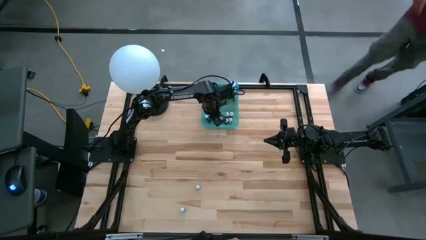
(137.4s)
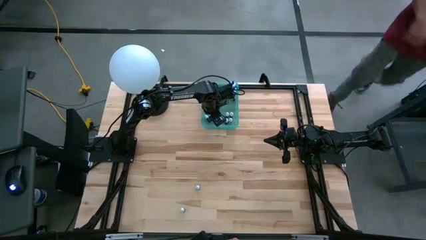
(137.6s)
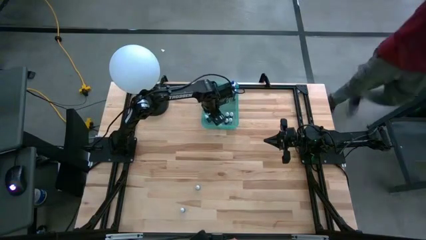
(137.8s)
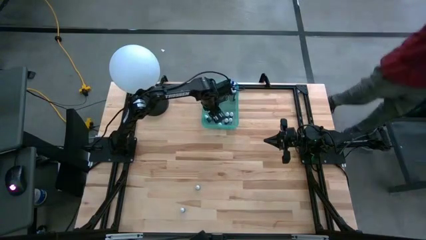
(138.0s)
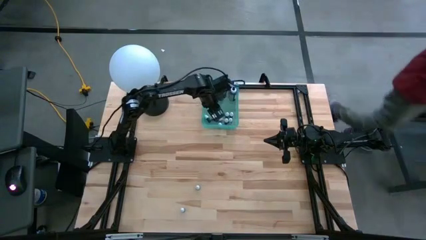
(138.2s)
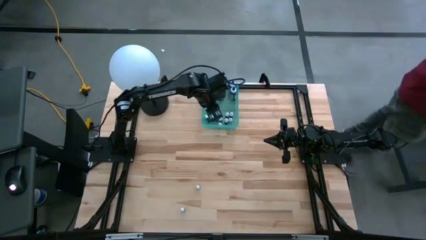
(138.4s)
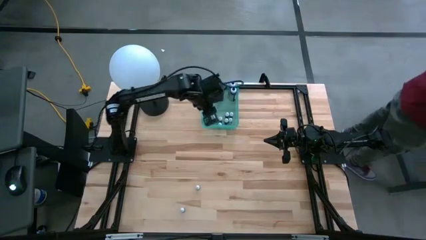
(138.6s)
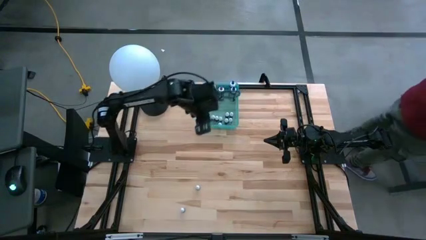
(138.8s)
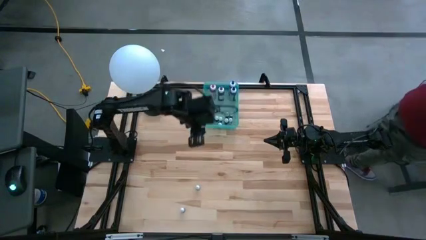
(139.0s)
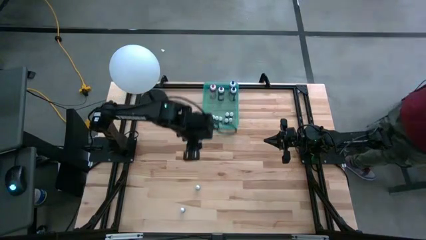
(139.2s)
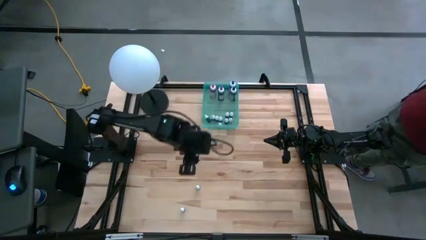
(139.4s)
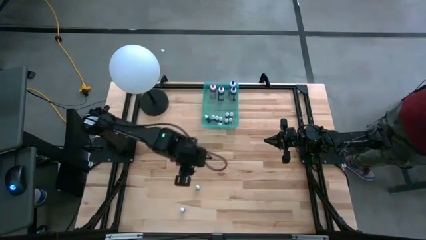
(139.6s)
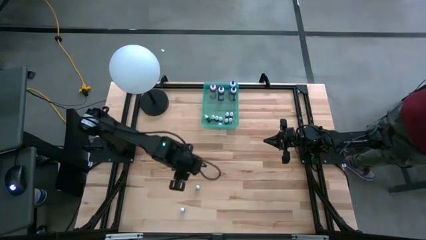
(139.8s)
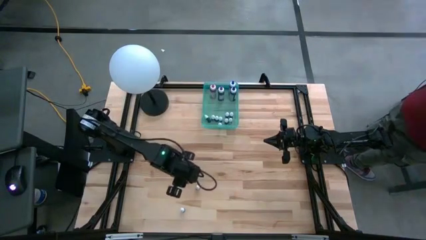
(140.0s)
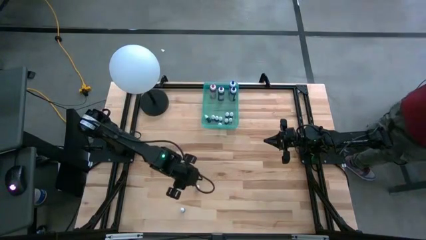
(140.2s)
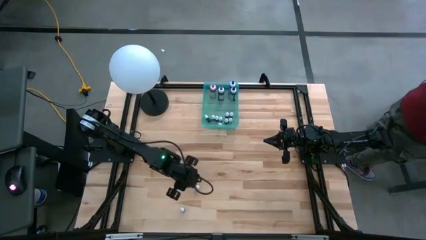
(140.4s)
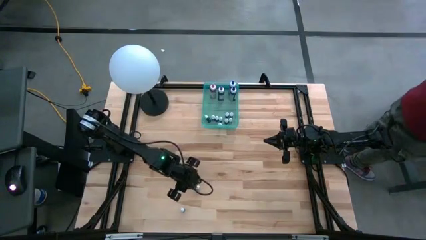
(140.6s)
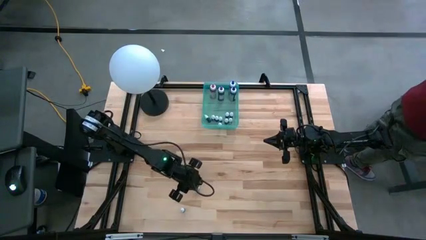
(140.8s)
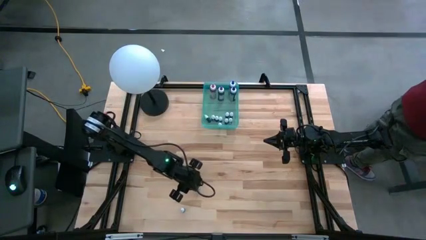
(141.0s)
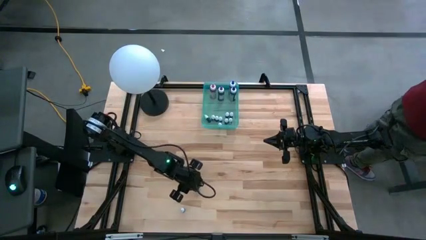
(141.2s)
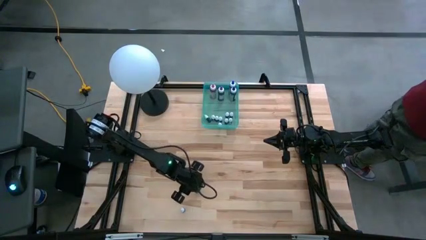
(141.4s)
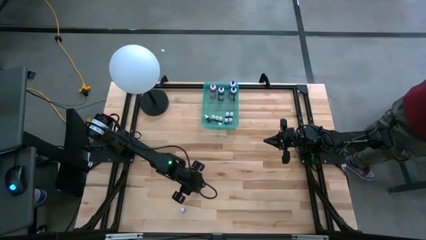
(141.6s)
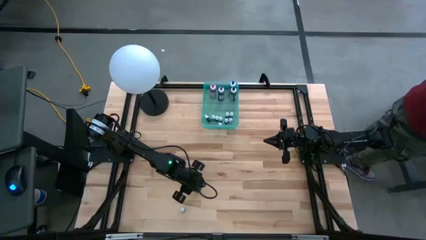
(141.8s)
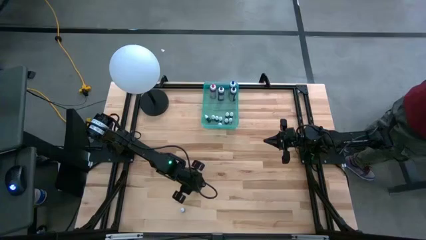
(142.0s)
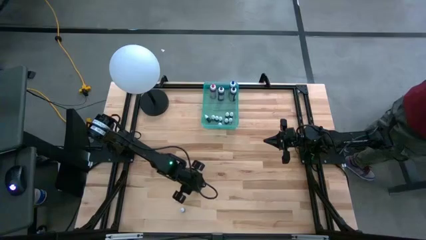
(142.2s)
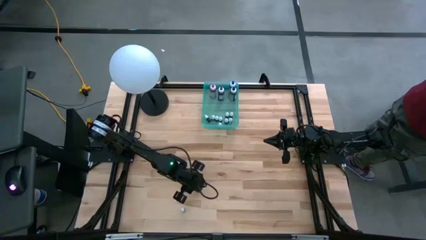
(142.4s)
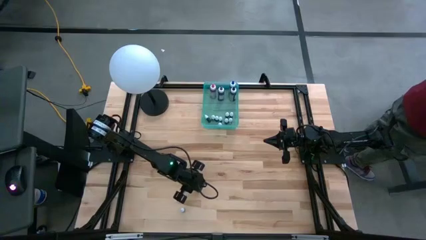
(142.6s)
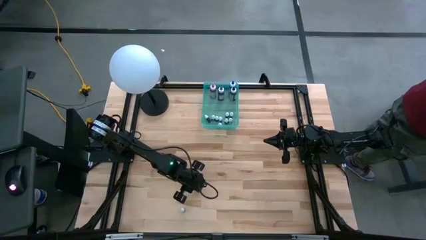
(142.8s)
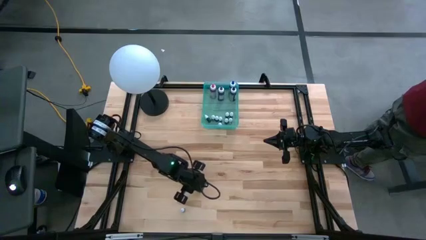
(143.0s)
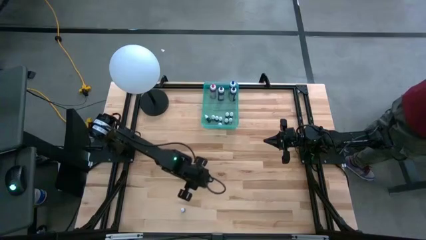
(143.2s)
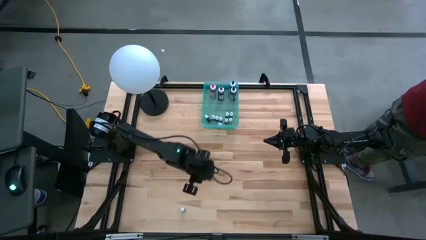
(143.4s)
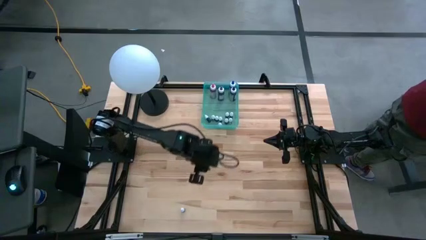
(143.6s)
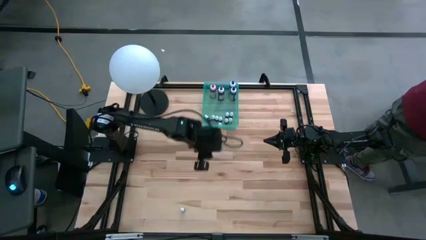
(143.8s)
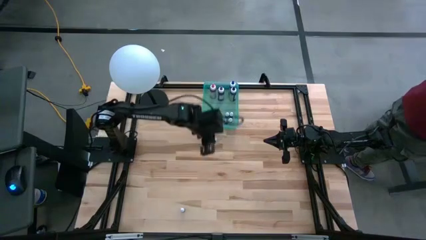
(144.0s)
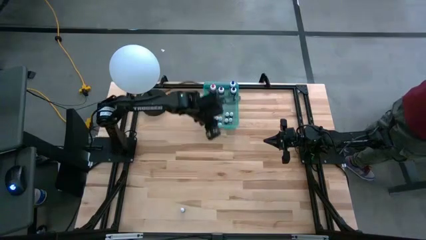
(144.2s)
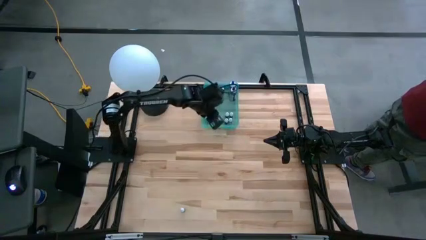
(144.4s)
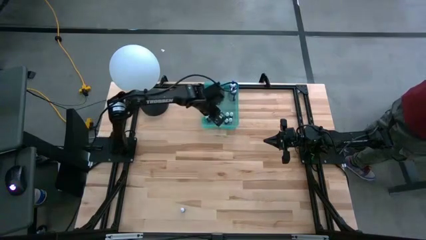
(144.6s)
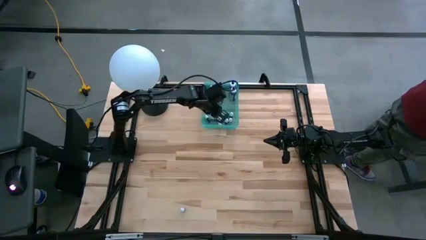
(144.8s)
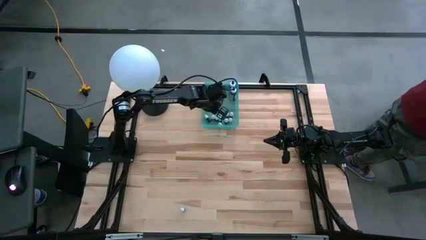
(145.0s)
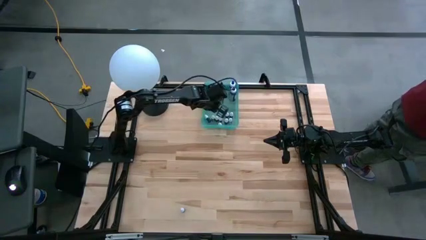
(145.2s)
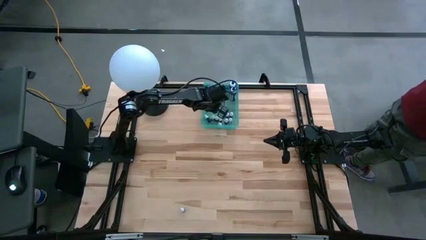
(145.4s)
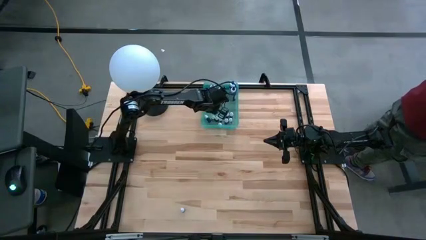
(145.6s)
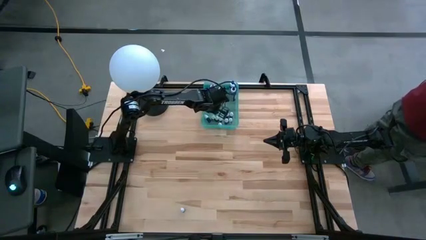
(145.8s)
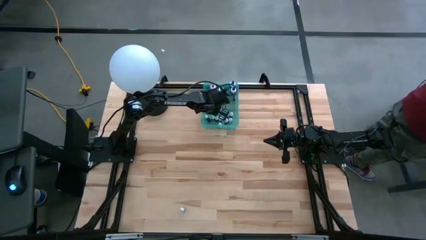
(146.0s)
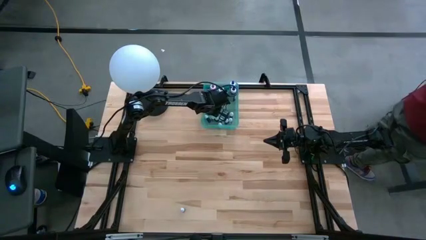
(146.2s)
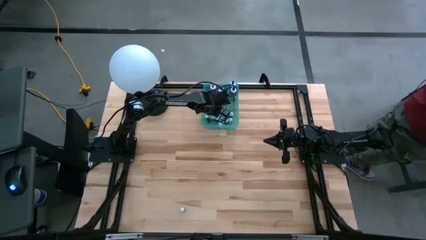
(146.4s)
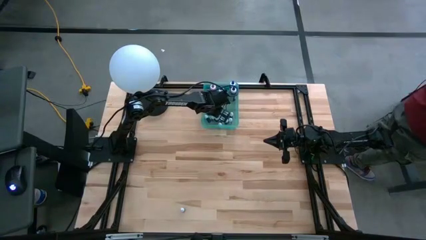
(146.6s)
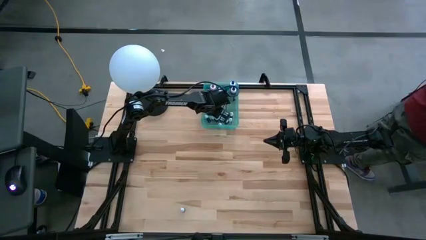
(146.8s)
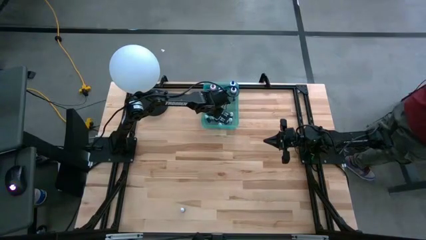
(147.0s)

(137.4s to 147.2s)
Task: Pick & Place food coloring
Put the green food coloring bottle into the light blue bin

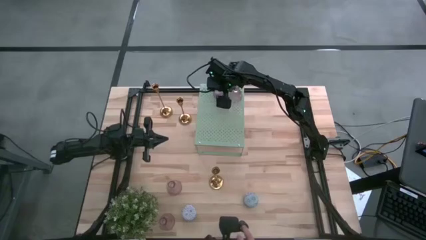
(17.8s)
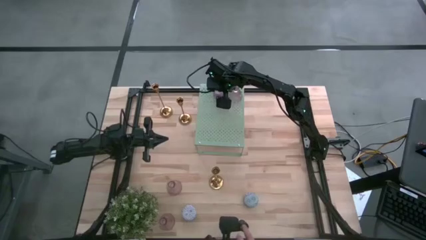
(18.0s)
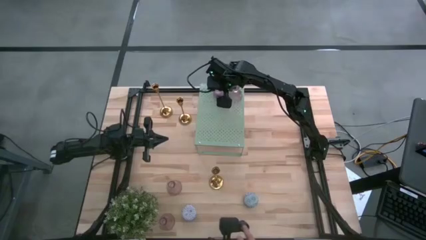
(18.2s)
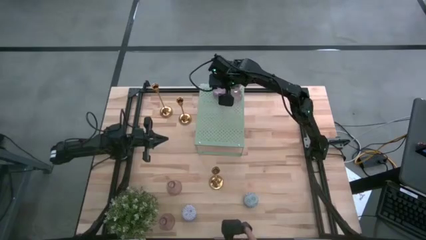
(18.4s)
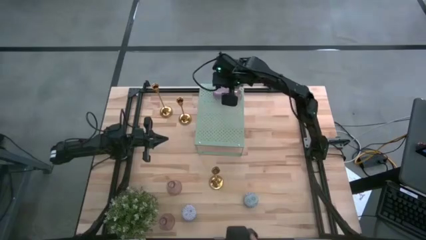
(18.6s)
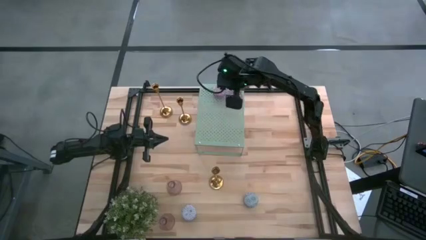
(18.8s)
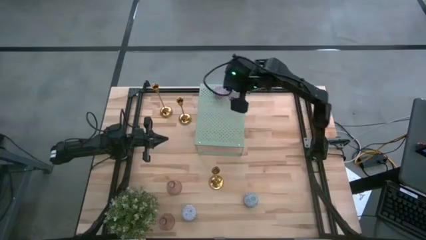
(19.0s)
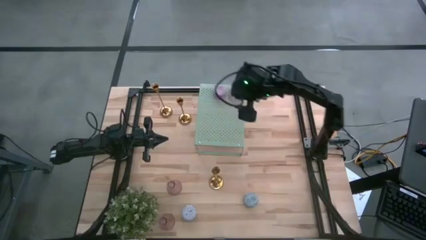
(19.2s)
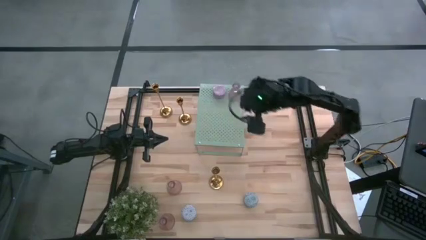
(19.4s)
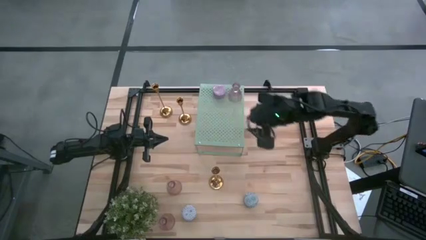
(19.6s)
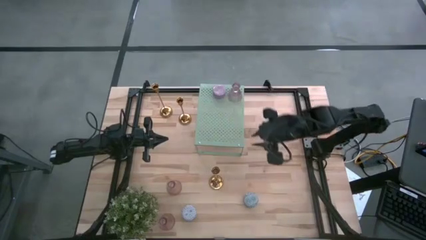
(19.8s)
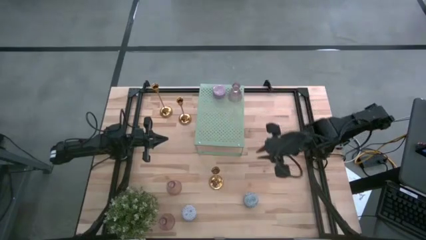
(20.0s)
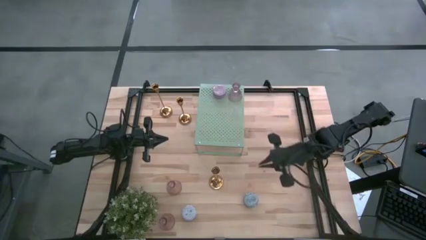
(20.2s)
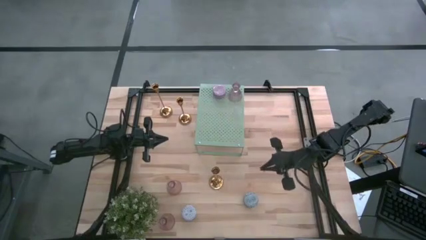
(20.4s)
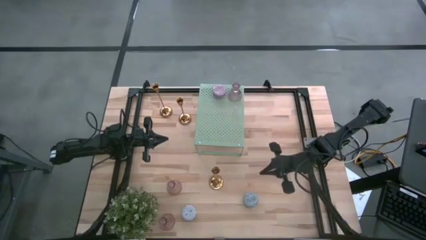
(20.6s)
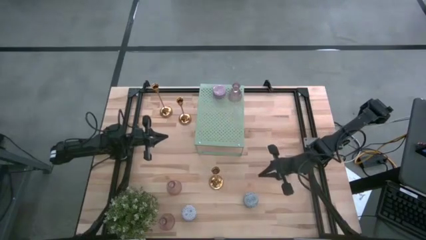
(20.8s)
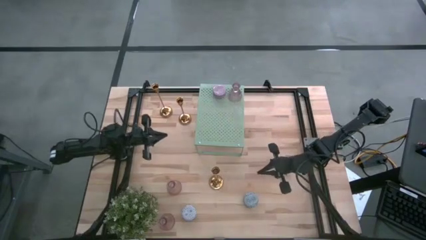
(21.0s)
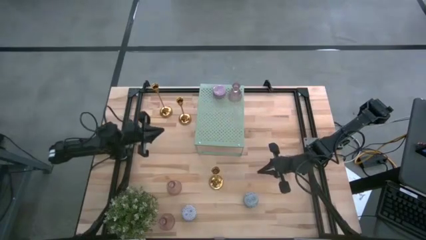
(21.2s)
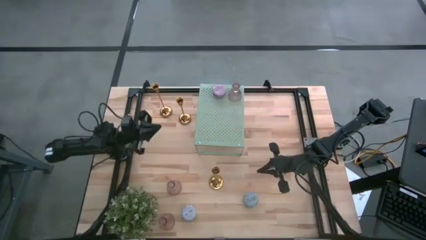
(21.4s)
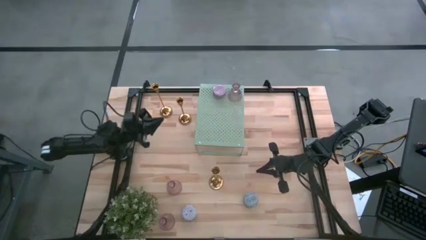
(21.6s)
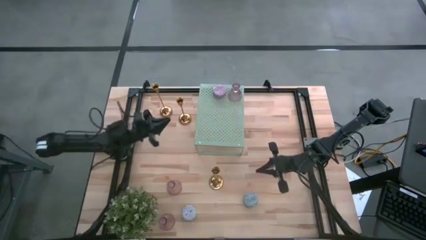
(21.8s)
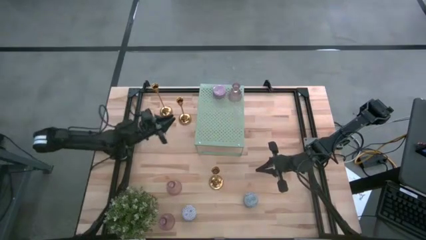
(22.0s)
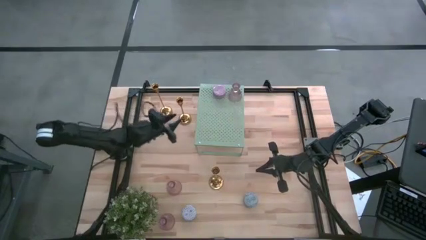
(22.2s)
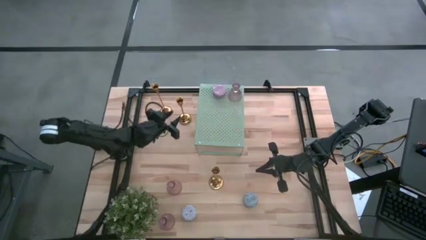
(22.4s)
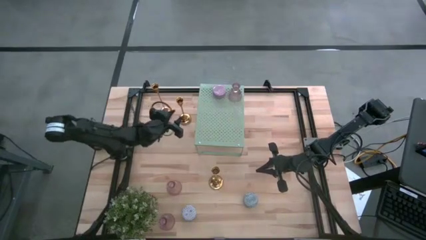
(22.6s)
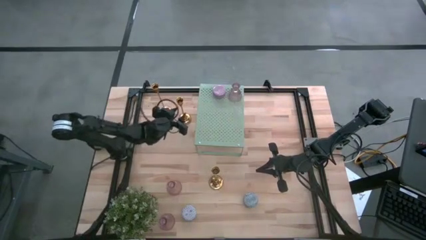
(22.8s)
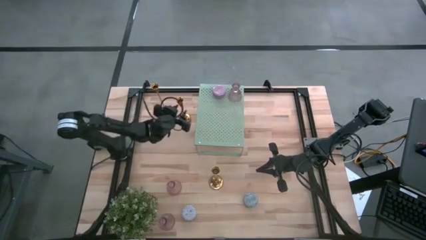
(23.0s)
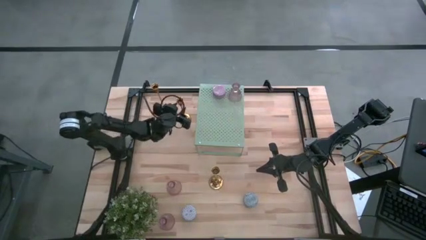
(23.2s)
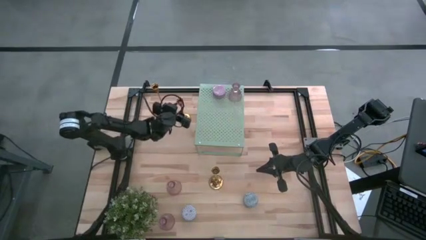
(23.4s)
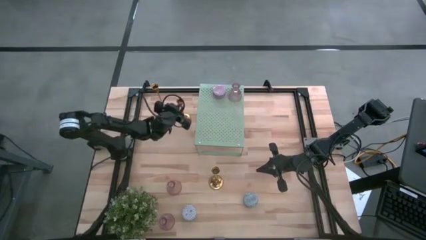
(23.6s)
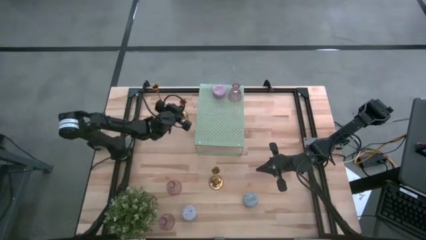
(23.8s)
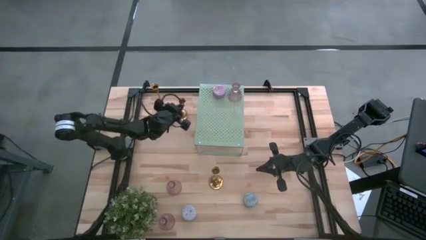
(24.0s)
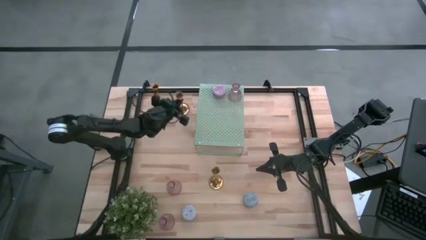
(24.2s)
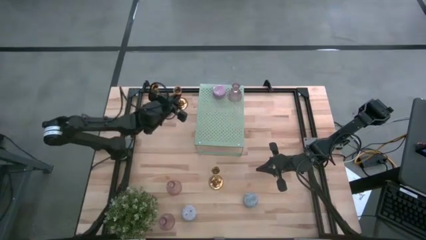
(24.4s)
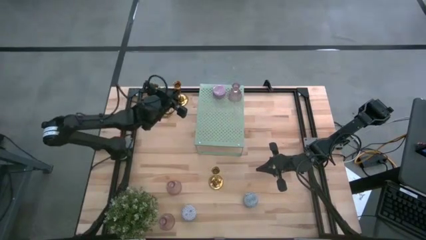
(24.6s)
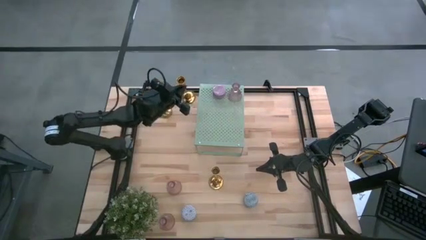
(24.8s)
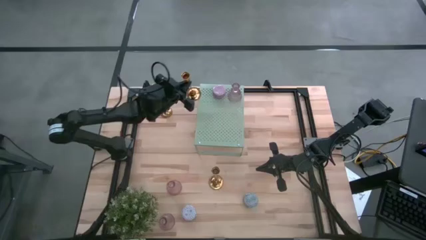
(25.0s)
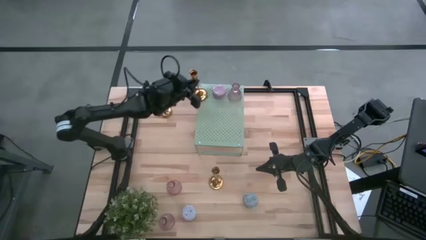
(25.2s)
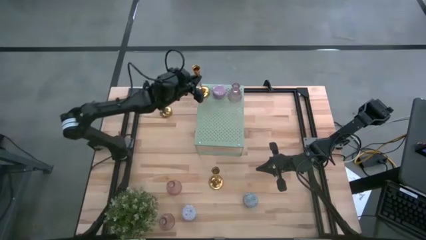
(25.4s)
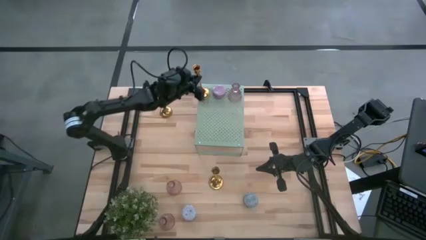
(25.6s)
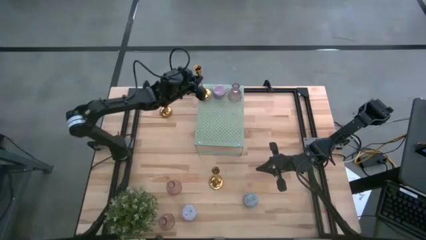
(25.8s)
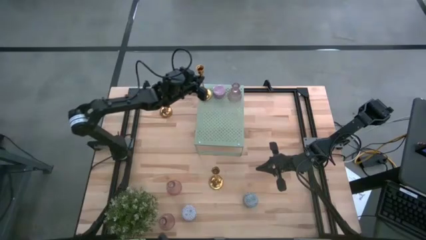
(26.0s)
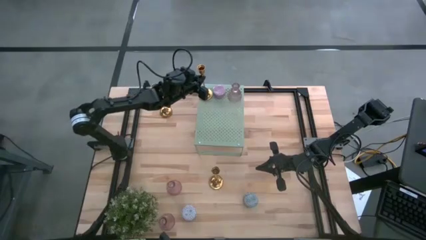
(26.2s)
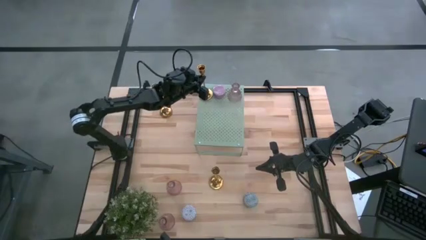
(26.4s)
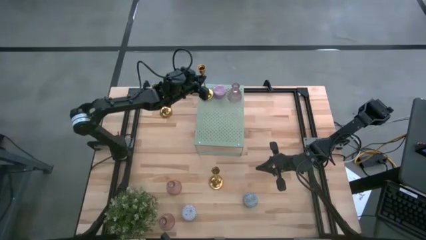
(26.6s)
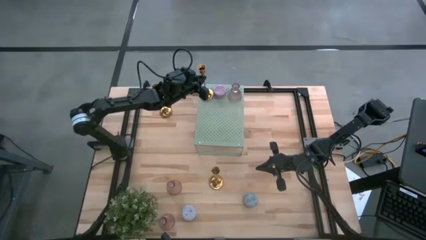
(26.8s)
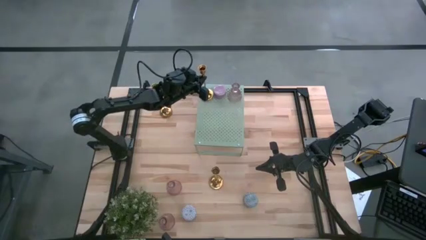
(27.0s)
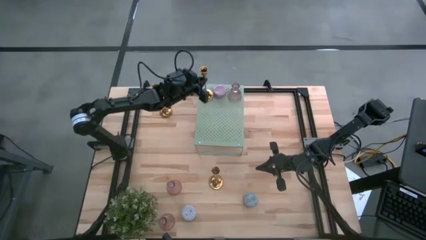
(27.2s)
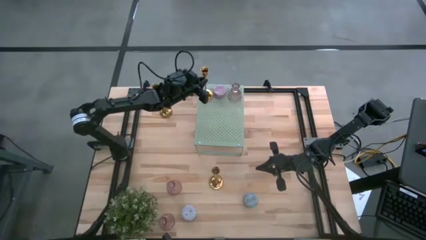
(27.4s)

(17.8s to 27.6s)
Task: Pick & Place candle stick holders
Put the top-right metal gold candle holder on the shelf
